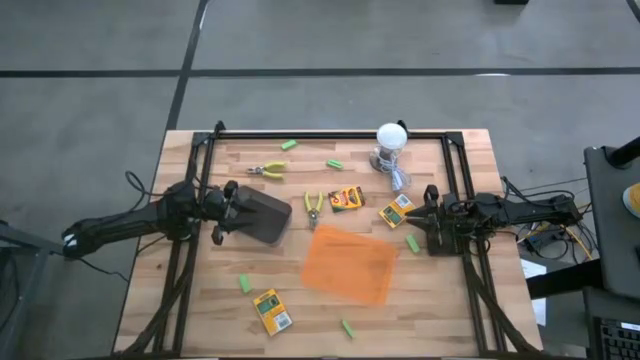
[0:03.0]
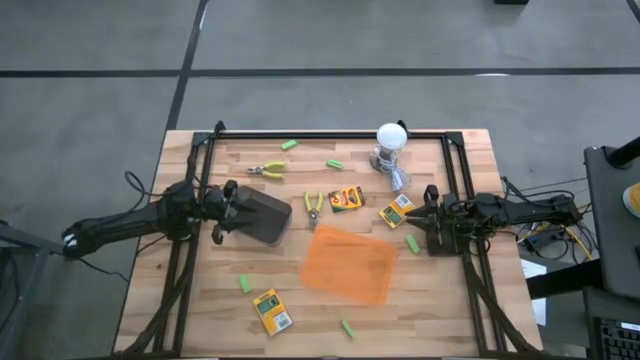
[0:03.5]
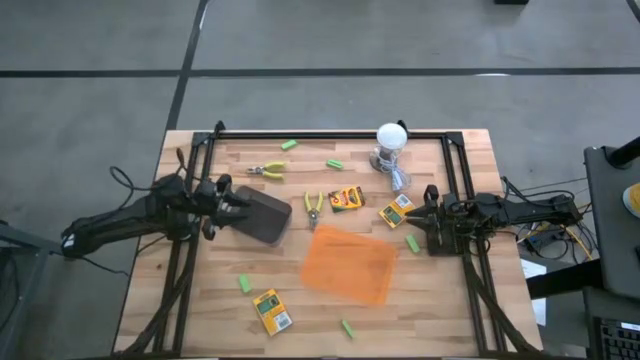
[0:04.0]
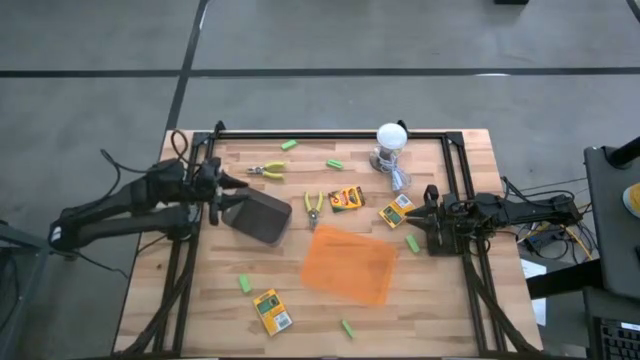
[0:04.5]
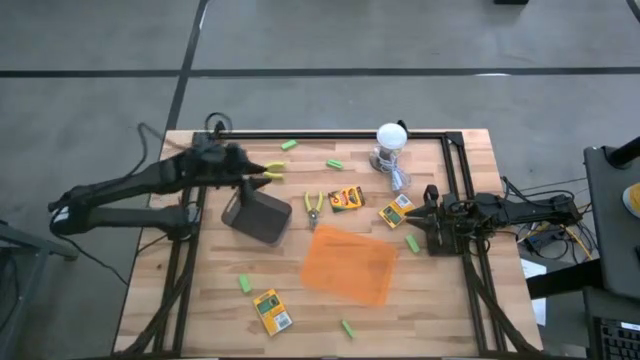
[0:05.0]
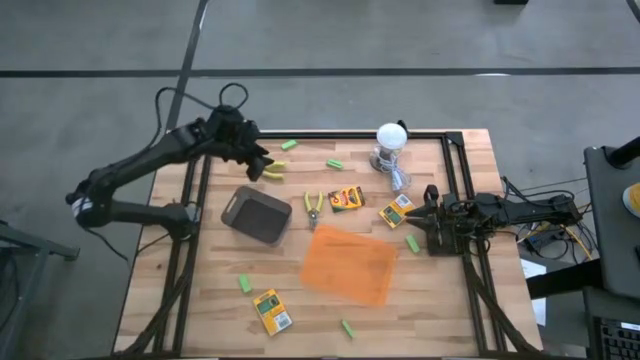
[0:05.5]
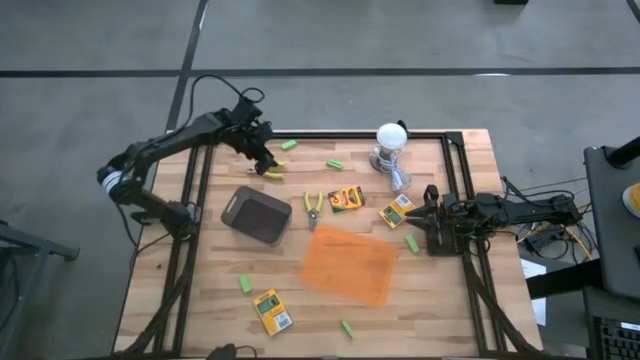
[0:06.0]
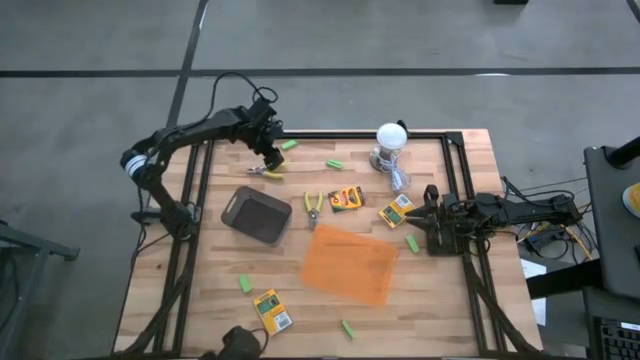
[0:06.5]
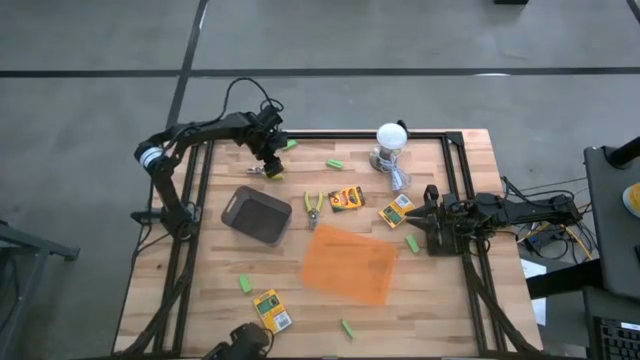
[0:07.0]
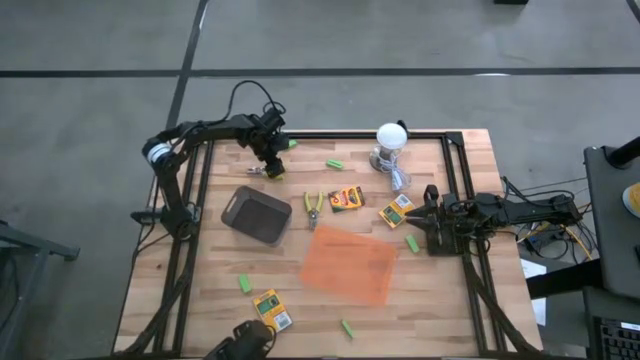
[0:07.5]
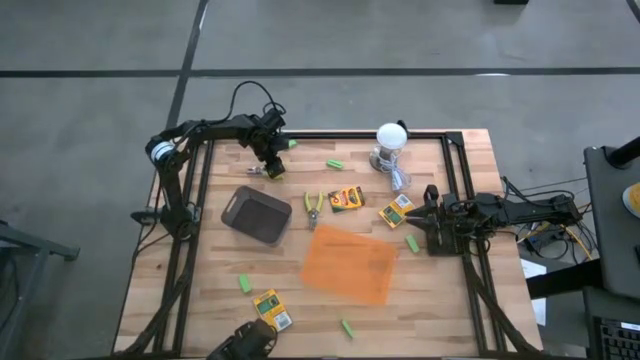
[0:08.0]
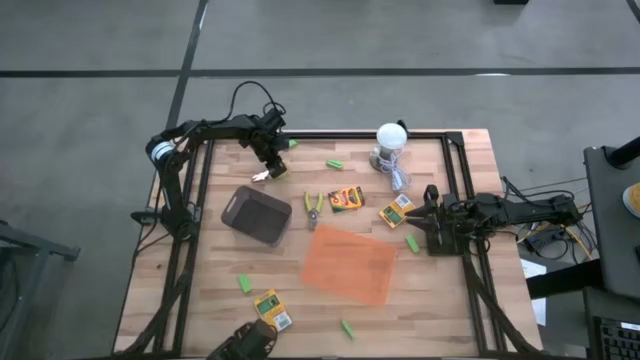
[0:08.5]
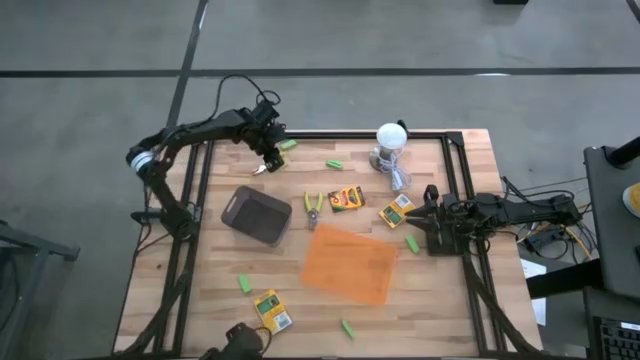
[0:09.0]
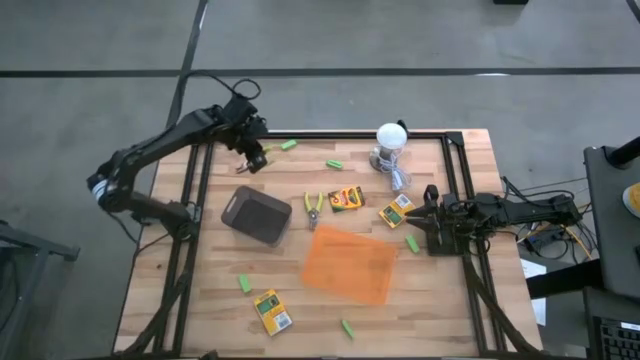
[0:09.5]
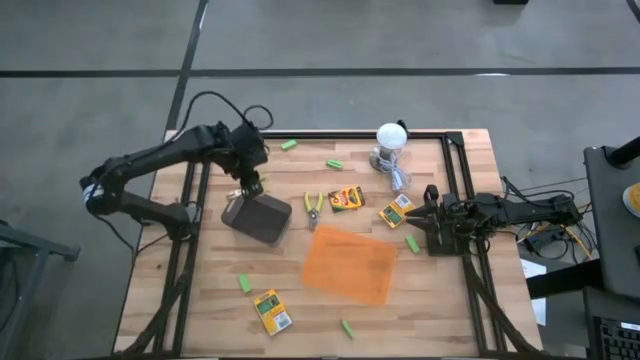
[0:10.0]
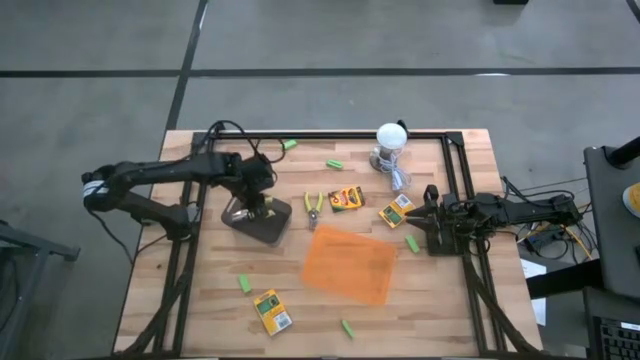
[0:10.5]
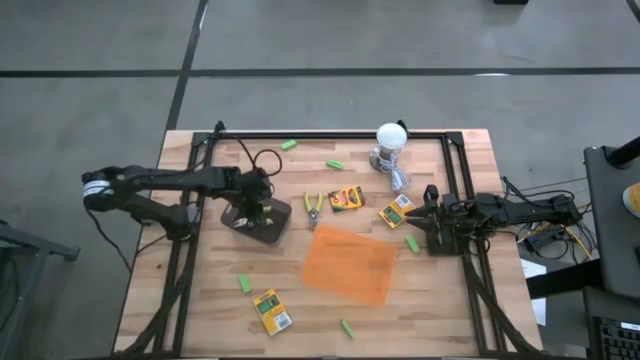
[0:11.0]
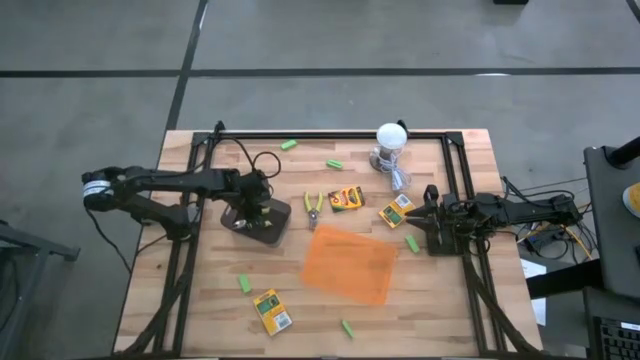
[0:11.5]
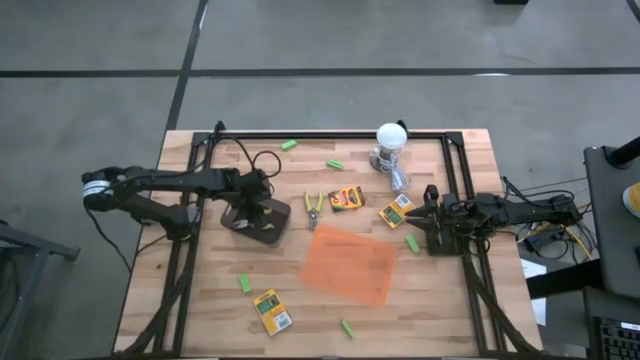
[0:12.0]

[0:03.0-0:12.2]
Task: Pick & Place School Supplies
Put the top pliers into the black bin

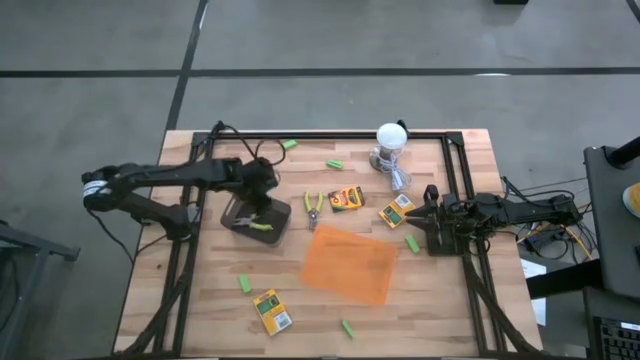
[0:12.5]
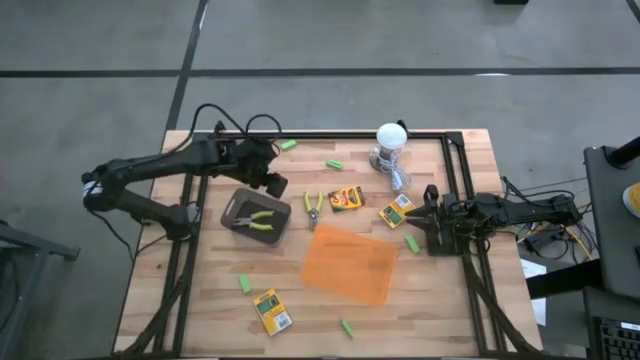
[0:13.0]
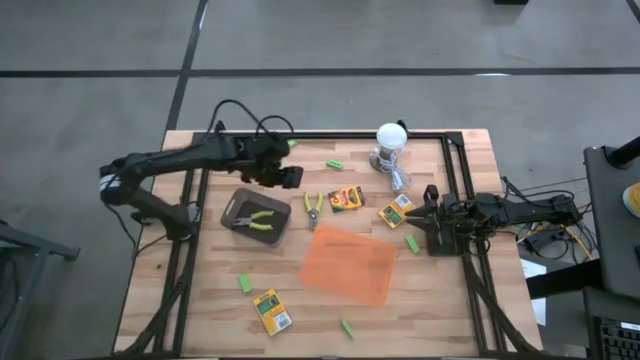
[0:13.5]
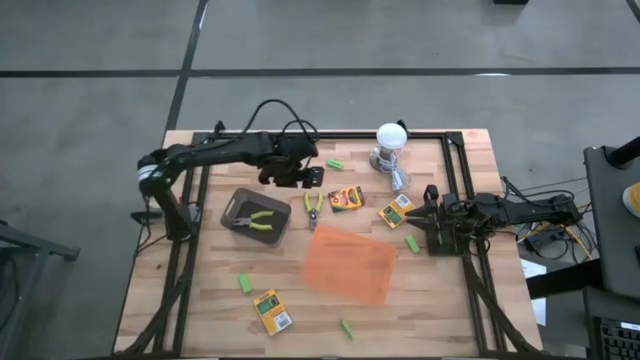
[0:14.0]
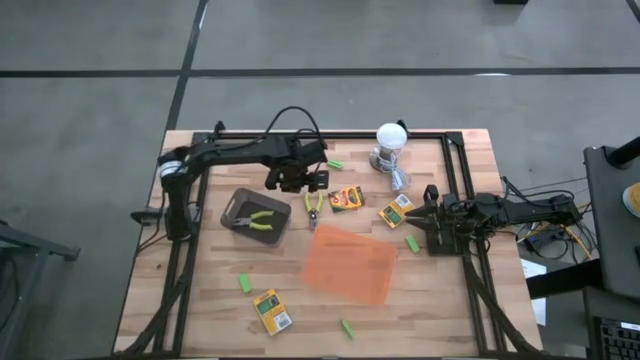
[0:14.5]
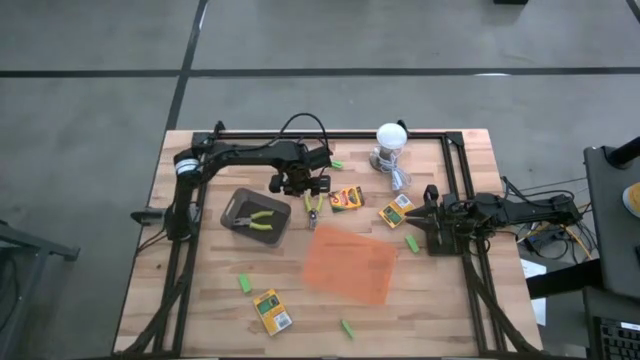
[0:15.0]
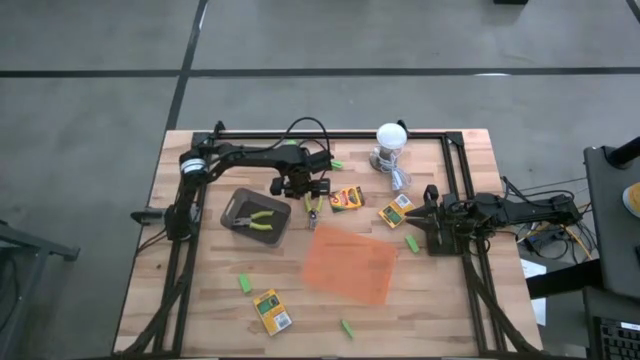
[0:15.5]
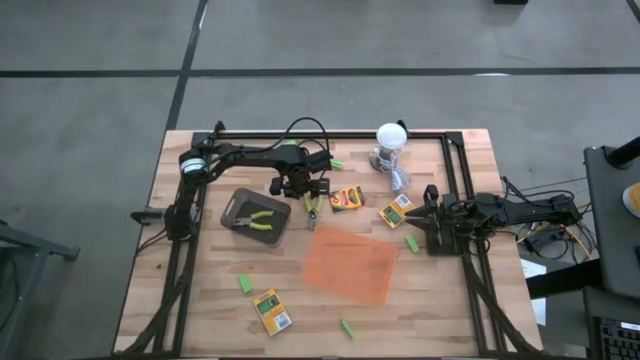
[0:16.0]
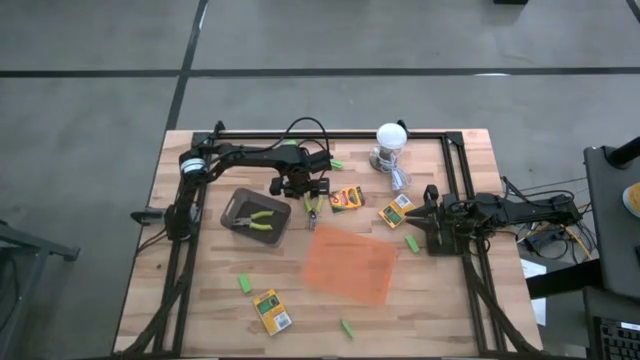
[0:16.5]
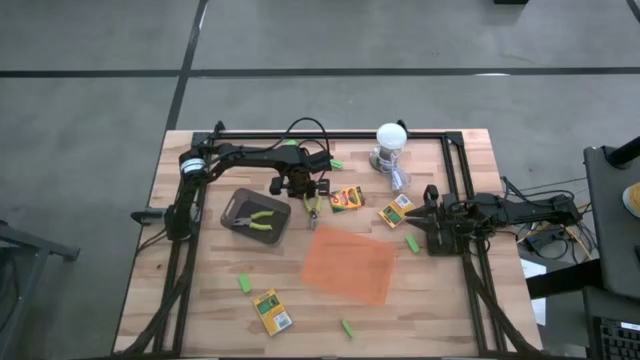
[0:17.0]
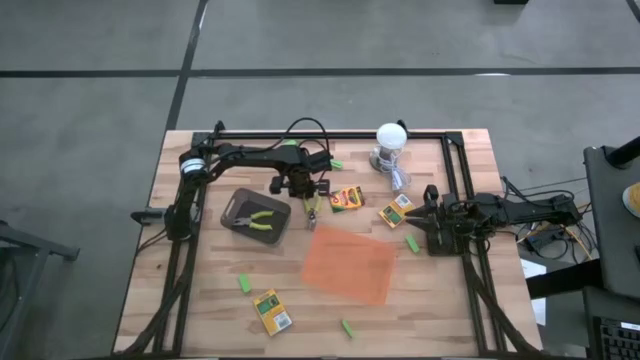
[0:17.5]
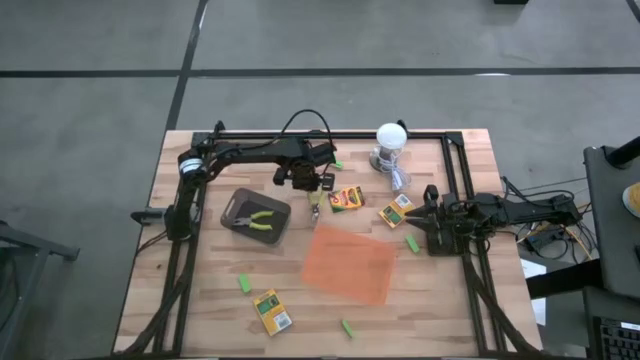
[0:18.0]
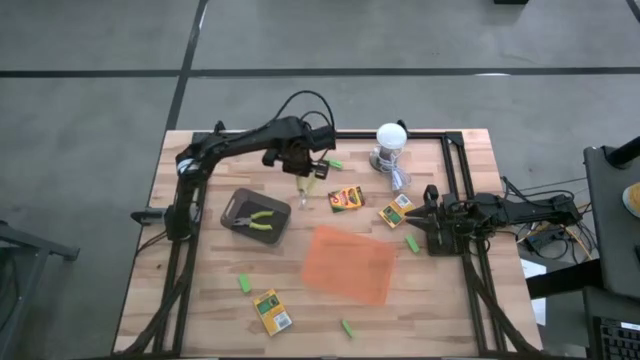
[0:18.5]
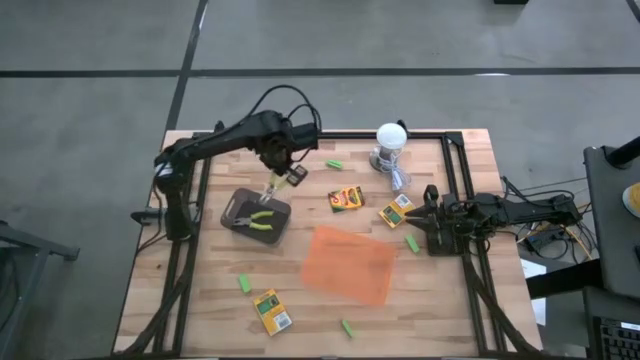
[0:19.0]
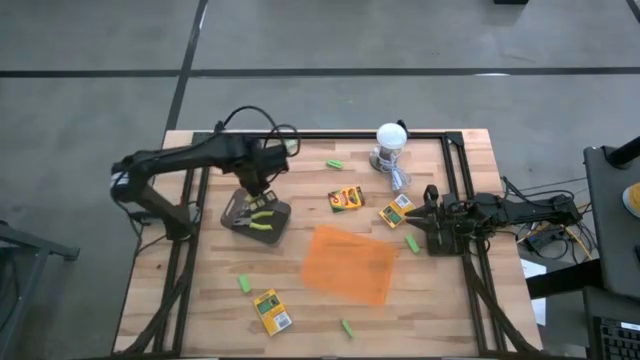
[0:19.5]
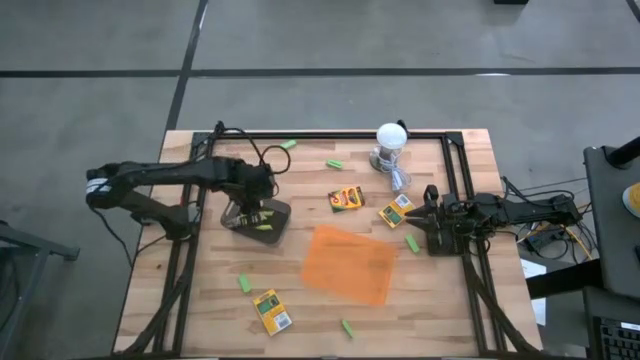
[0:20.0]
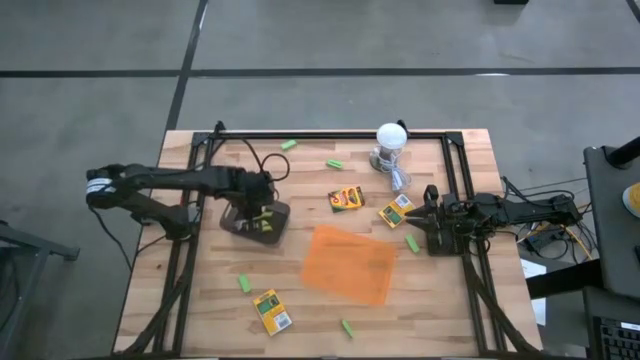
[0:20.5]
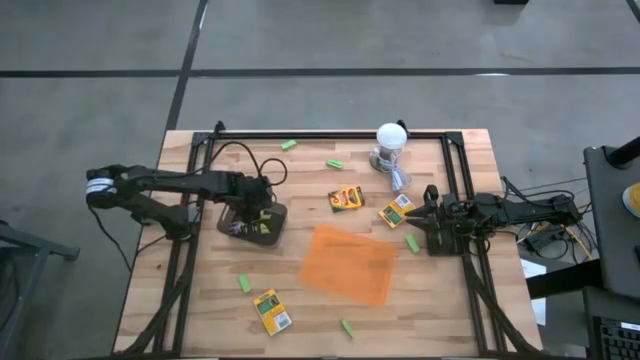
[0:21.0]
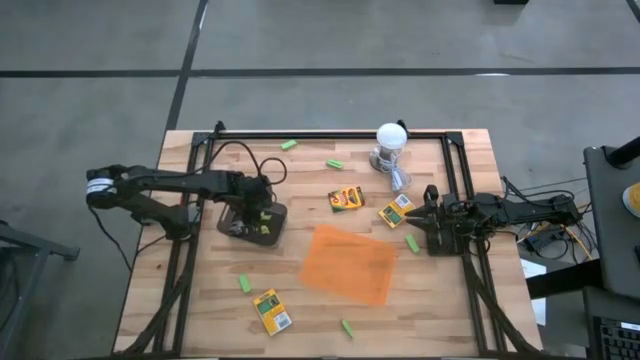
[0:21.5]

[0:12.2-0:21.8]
Put the pliers into the black bin

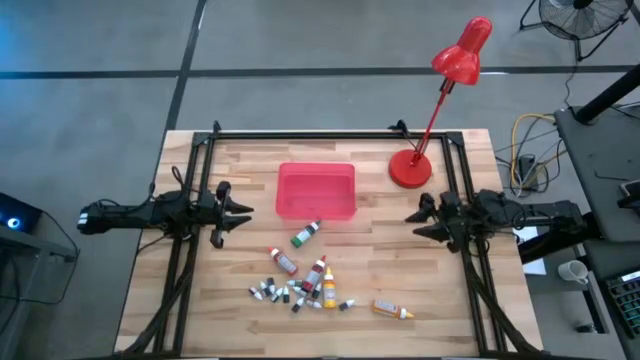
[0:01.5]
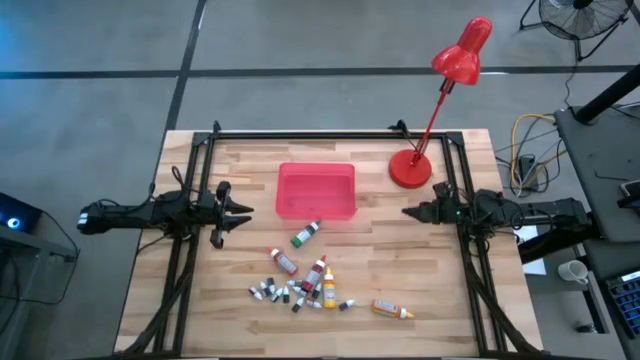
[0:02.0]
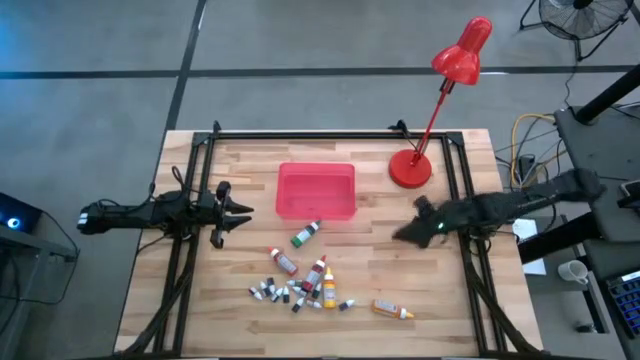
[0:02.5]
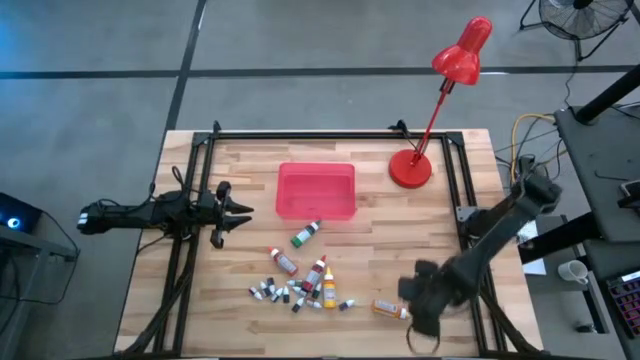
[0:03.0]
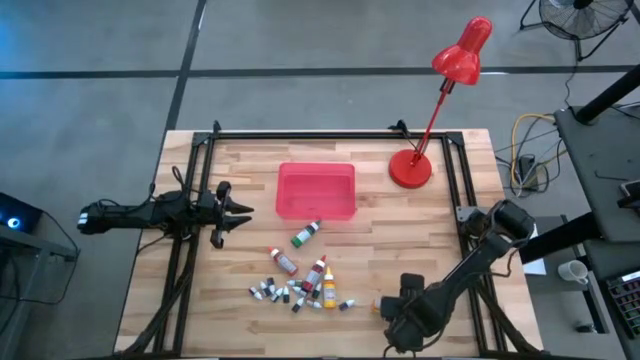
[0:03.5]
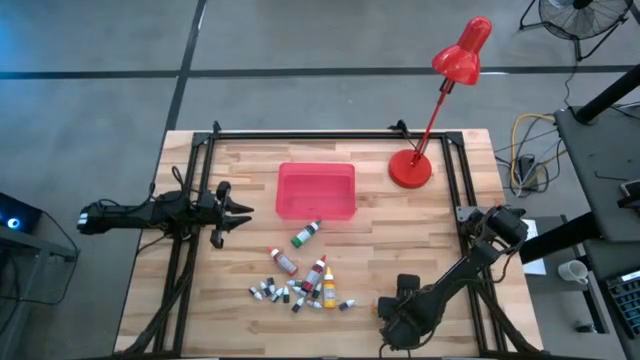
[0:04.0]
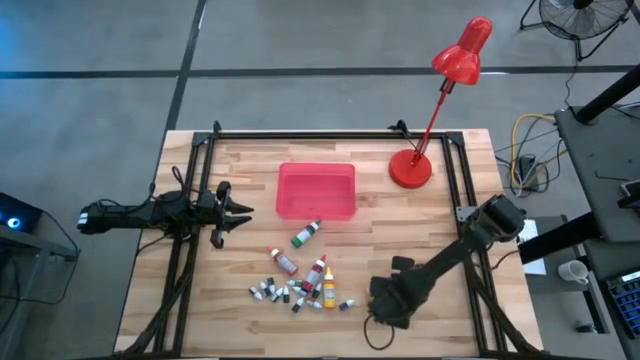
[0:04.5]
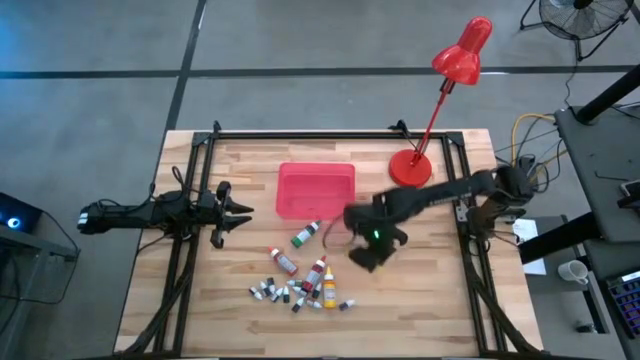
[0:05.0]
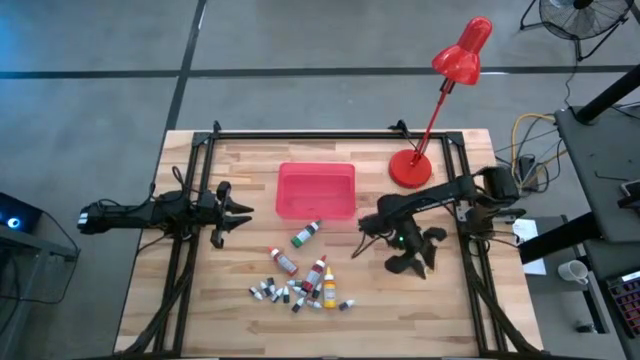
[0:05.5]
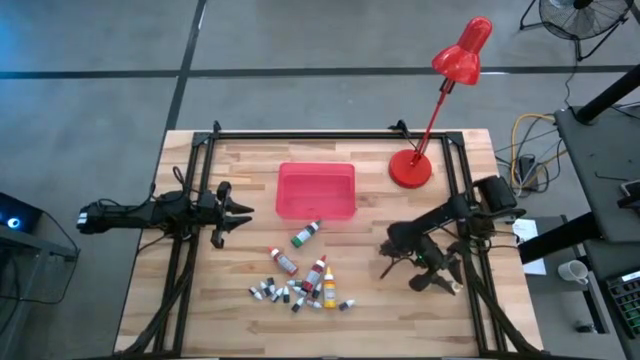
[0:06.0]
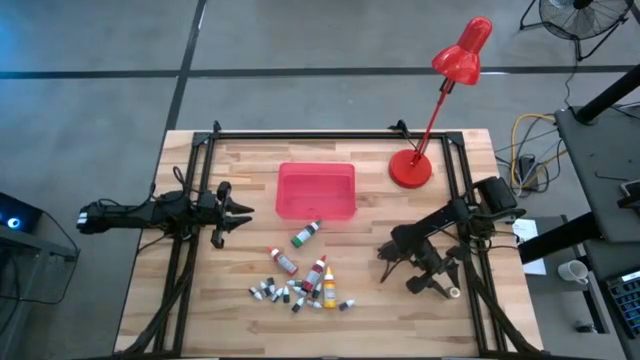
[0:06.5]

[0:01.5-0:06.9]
Task: Pick & Place food coloring
Move the big yellow food coloring bottle to the bottom right on the table
